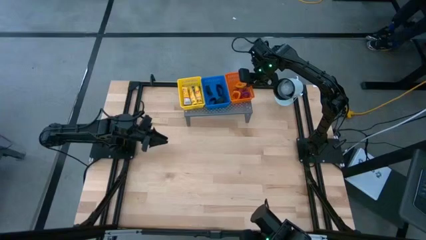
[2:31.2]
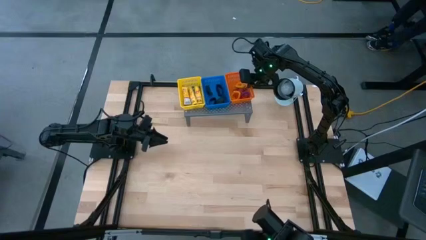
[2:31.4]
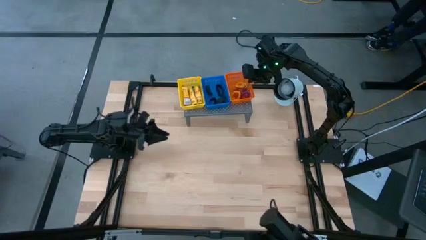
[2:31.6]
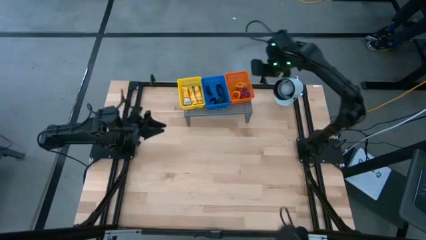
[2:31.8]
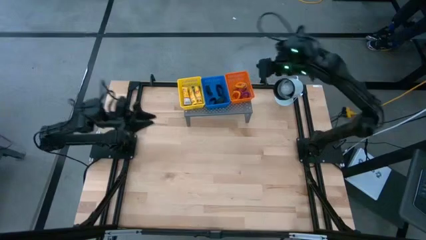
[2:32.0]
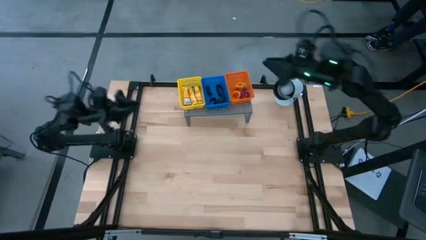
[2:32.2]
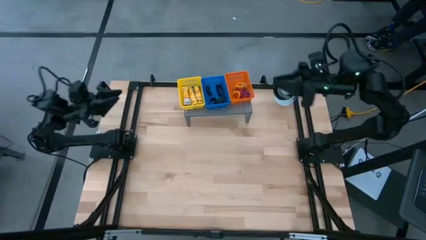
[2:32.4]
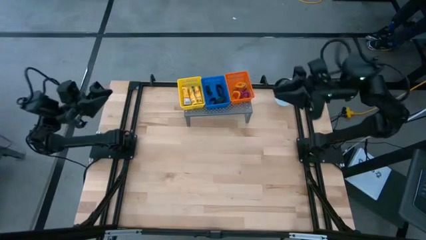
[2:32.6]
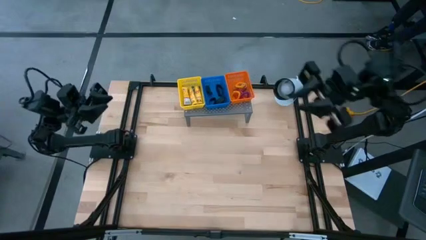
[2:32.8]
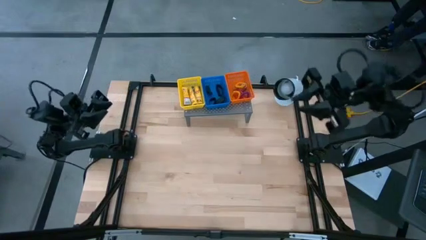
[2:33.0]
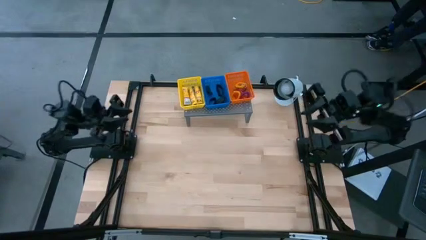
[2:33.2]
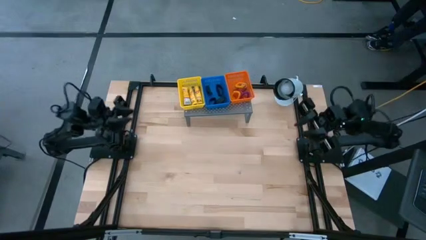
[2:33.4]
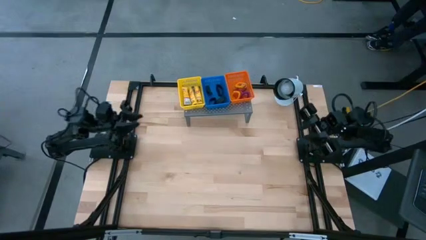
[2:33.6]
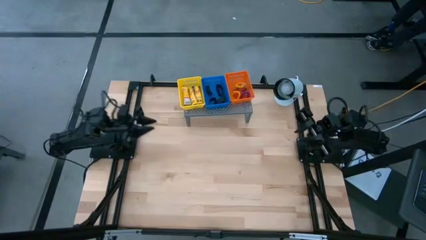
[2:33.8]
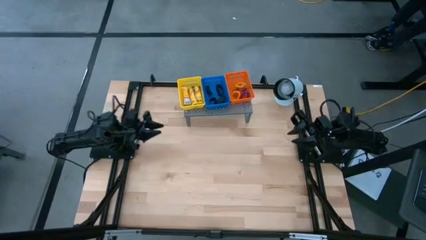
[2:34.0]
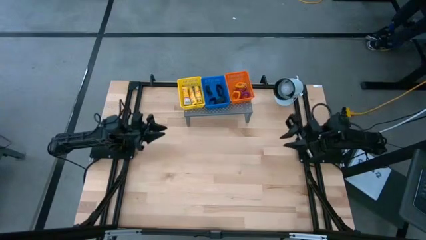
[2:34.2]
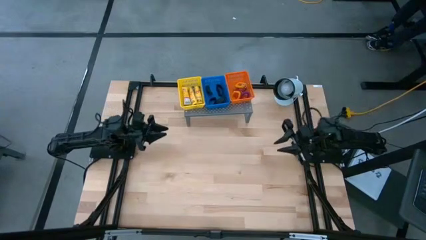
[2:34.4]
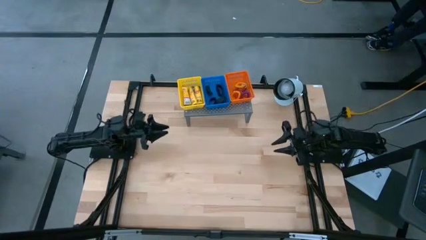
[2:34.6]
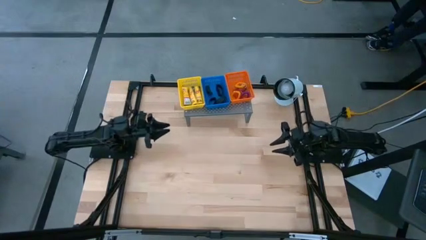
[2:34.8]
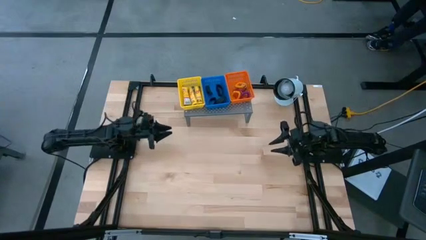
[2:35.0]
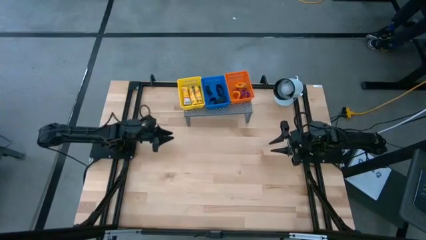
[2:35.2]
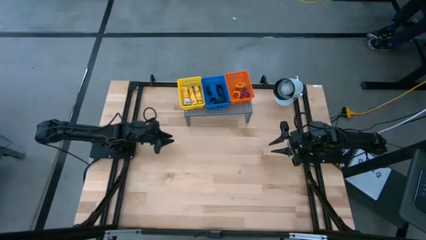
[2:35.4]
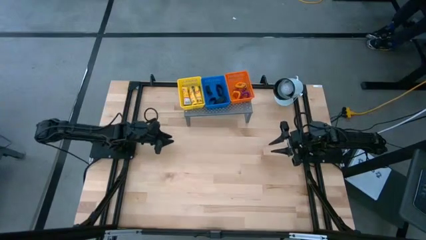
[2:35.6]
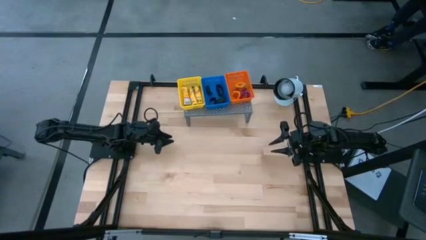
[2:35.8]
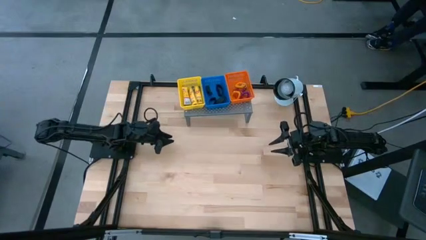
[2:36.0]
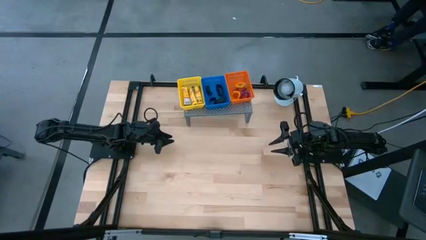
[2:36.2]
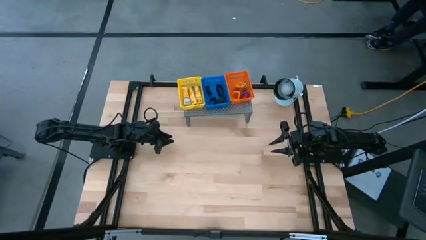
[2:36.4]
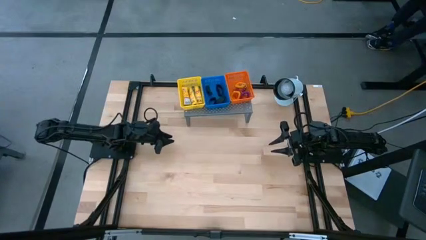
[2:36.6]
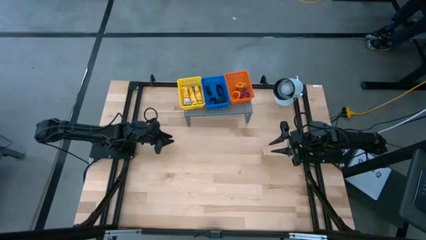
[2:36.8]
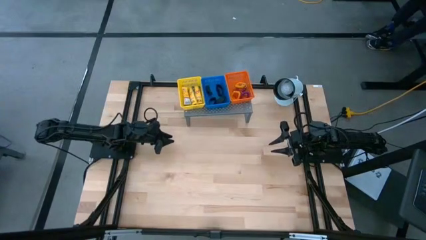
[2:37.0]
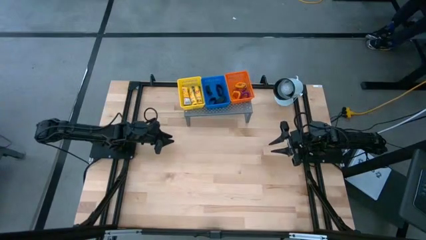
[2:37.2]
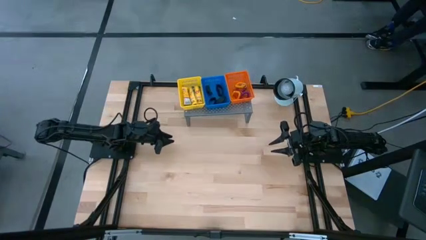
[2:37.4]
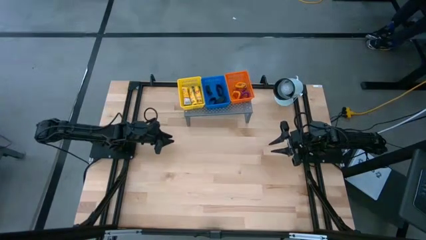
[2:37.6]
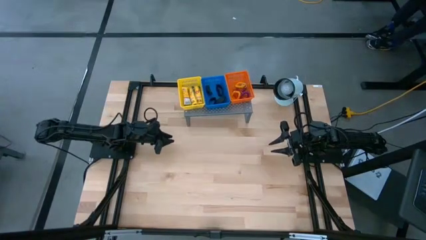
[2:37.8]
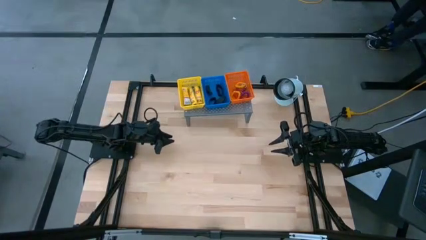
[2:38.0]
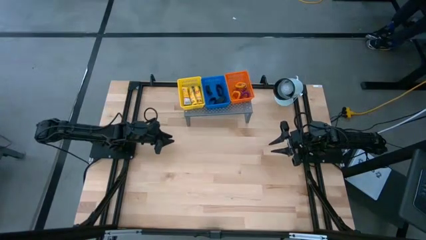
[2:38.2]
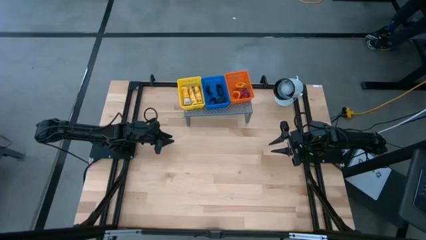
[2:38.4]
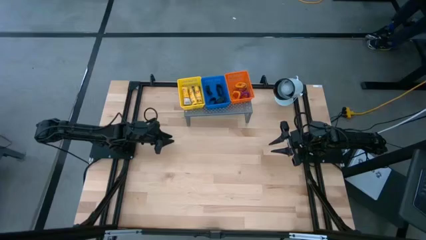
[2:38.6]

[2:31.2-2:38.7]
Task: Pick & Place Office Desk Supplies
Return to Home Position

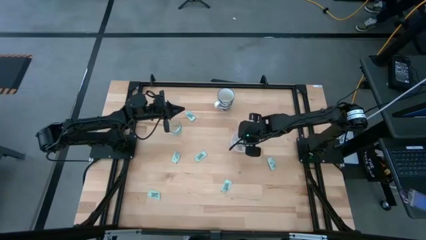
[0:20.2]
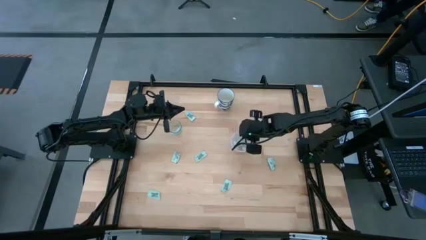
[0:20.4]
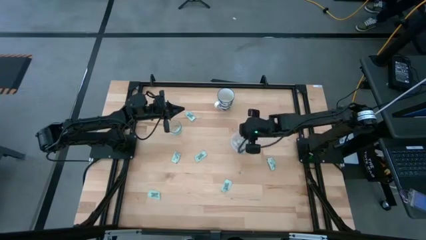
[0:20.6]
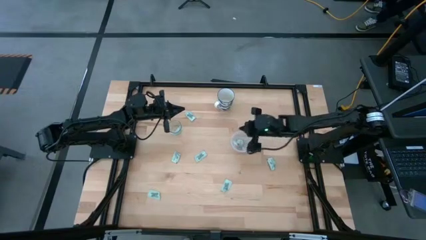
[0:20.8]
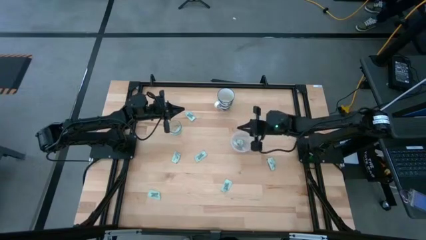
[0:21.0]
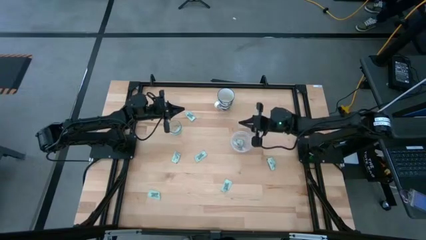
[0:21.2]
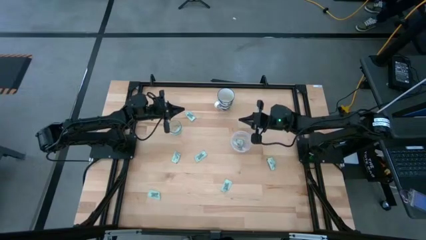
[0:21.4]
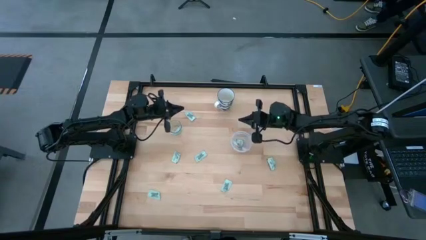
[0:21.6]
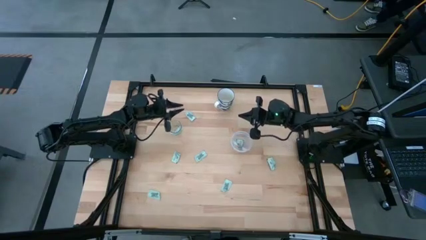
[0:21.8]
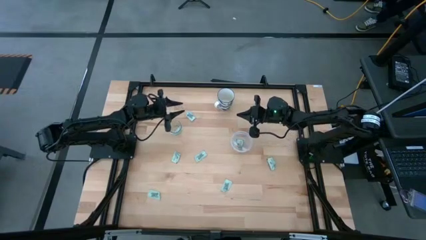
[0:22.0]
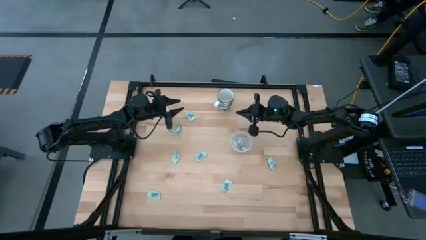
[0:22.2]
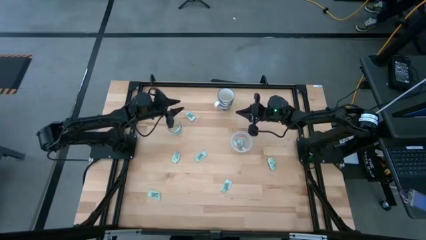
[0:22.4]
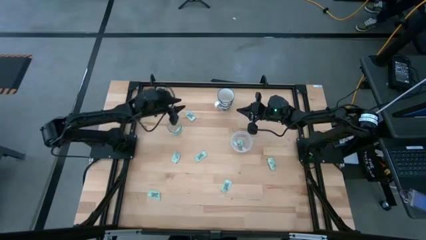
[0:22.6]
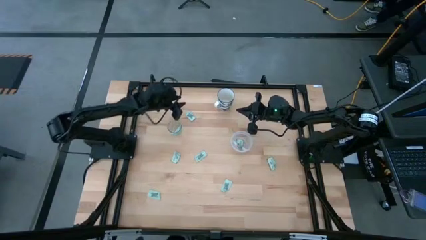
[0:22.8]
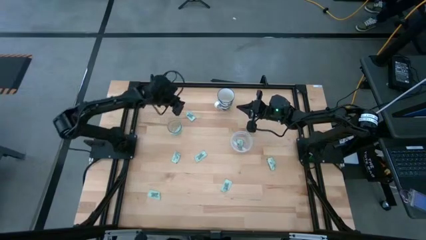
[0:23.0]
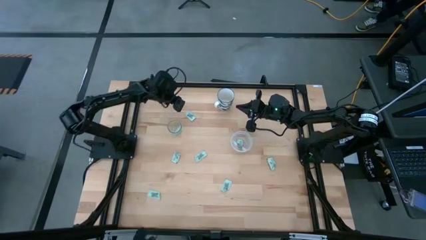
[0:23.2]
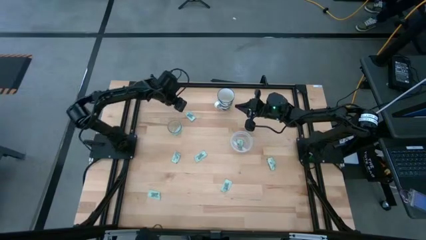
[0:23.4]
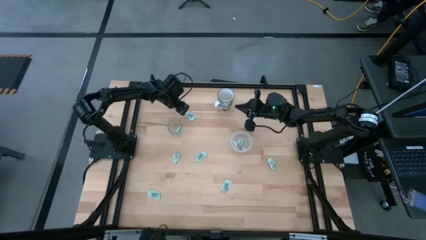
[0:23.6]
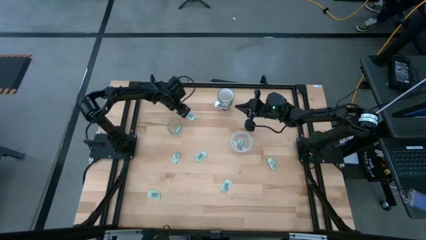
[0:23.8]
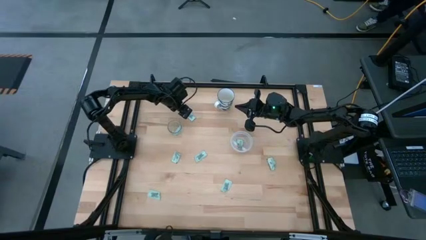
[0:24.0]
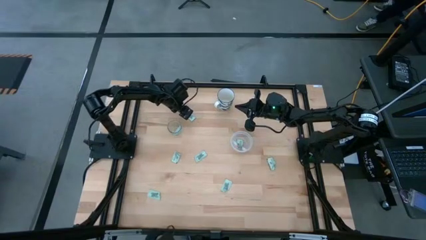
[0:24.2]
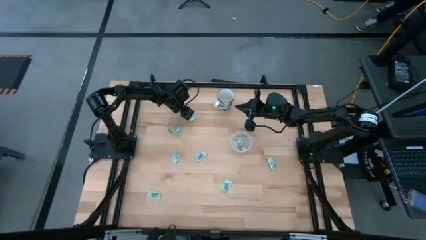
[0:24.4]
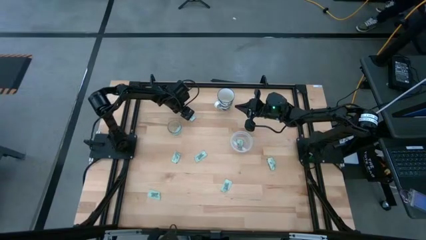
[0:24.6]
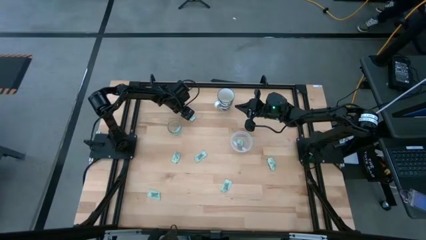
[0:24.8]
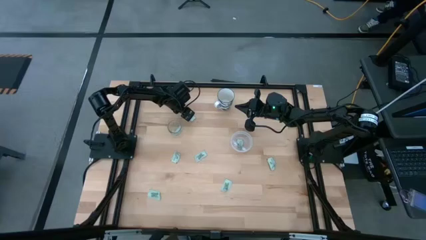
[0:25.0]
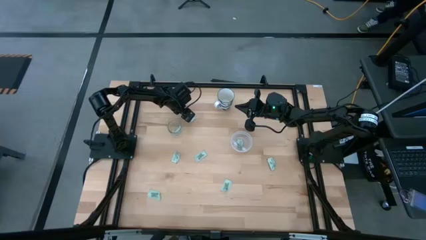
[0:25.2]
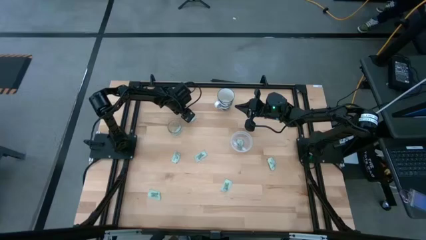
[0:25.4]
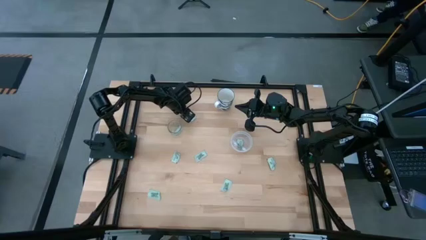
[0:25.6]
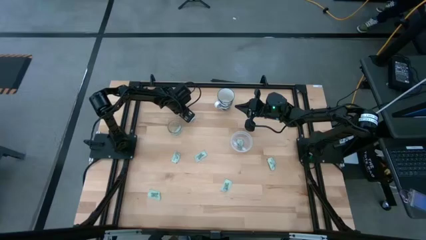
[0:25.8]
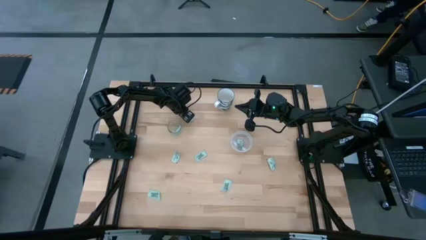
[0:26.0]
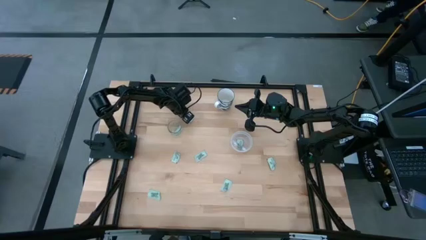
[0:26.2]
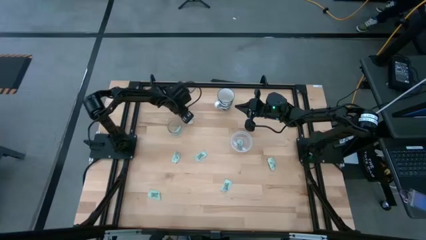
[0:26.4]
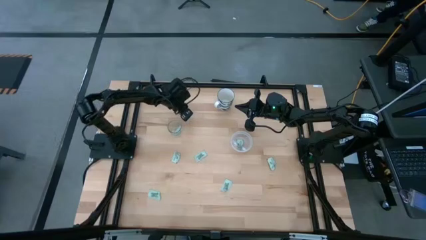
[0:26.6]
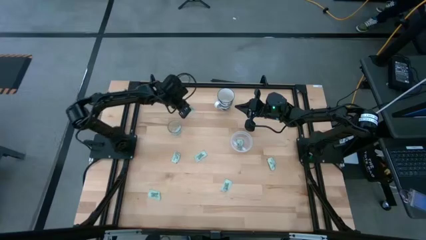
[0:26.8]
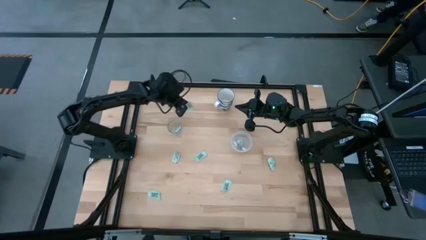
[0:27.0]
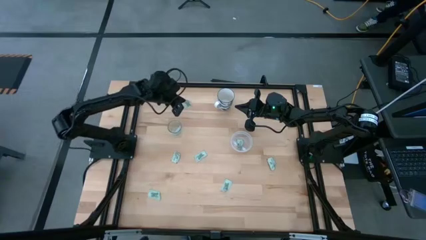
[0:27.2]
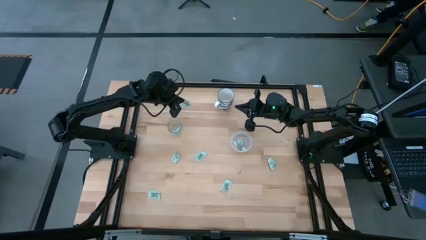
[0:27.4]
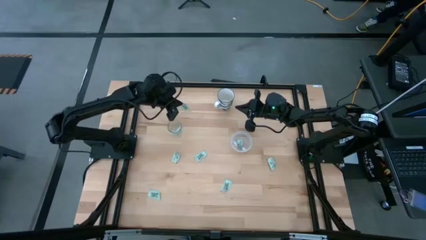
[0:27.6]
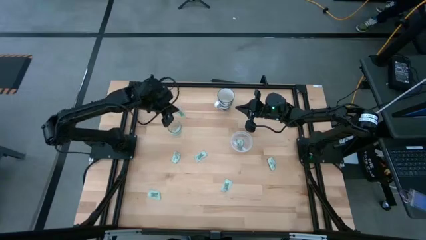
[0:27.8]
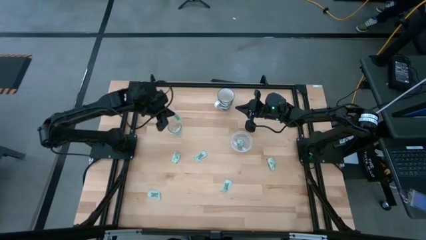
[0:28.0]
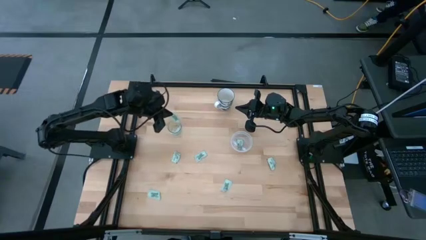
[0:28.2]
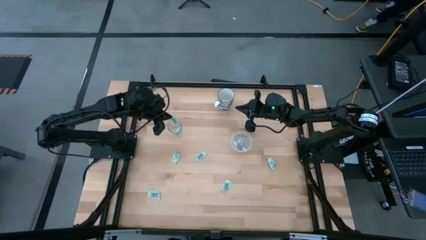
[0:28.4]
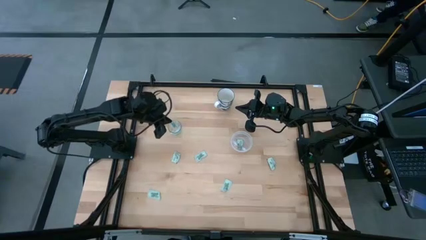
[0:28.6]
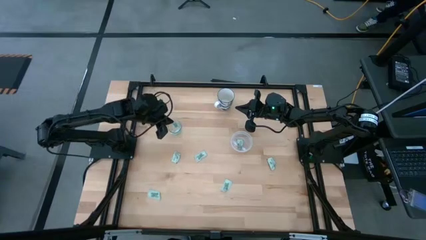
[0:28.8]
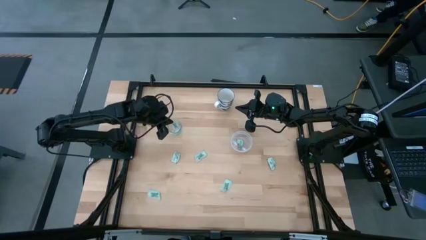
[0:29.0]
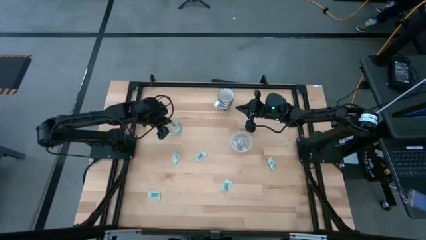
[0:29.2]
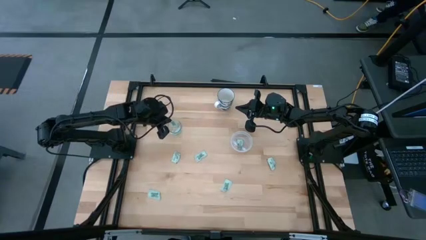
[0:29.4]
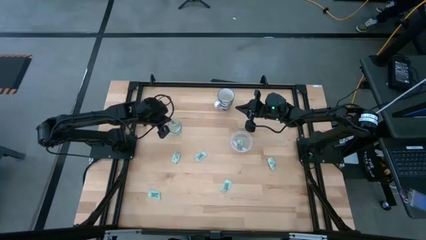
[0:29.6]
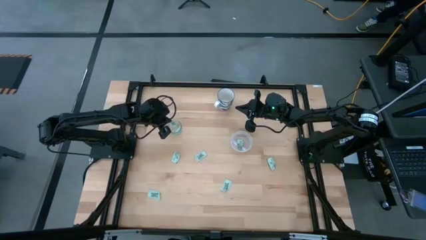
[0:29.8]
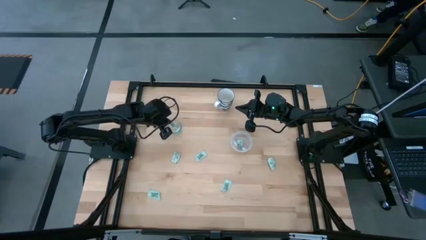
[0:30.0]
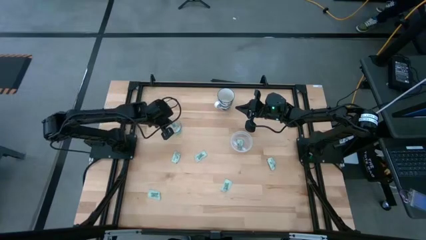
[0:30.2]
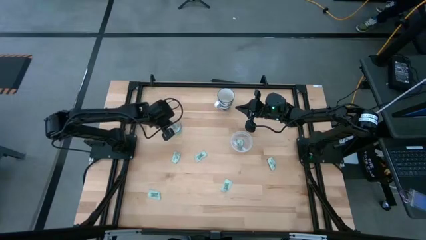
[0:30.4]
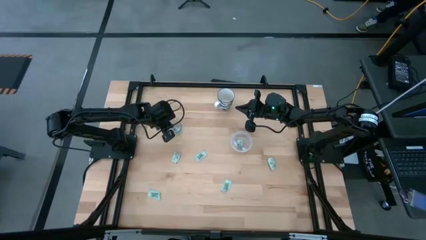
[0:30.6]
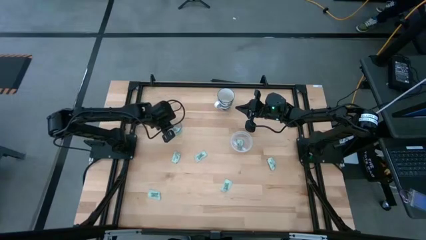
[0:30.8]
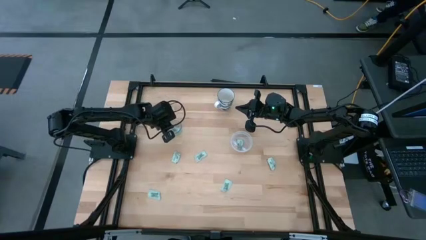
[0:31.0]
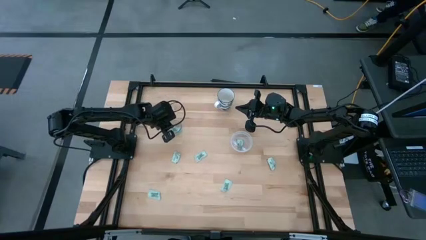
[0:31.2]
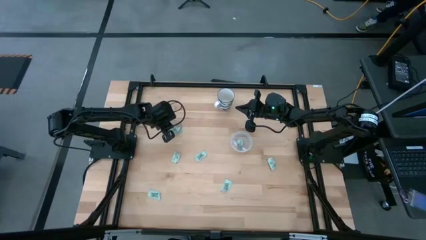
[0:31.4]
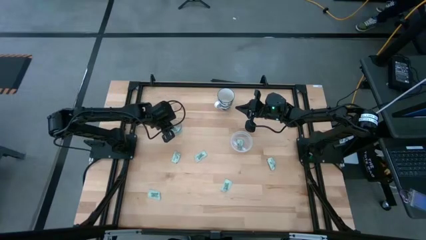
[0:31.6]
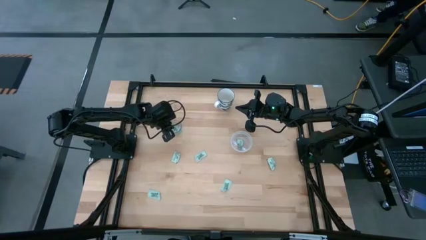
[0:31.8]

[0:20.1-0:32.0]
Task: Pick and place Stevia / Truvia into bins
Put the stevia packet into the transparent cup
